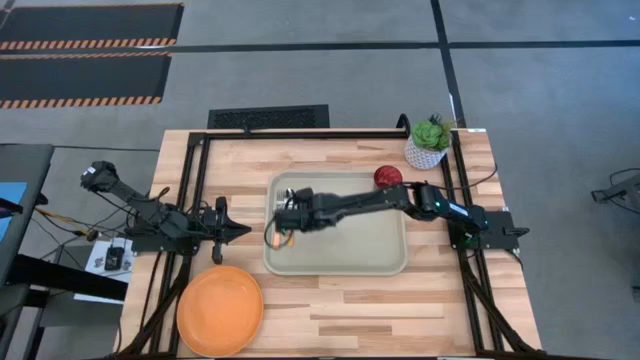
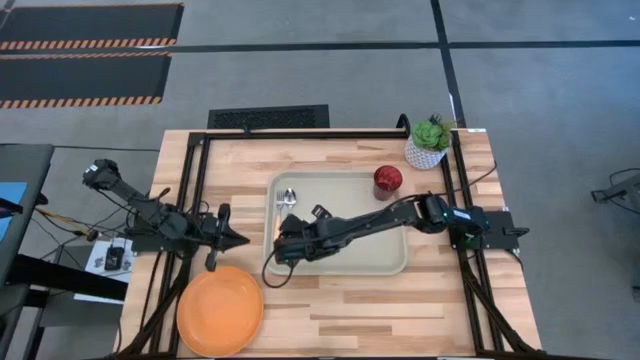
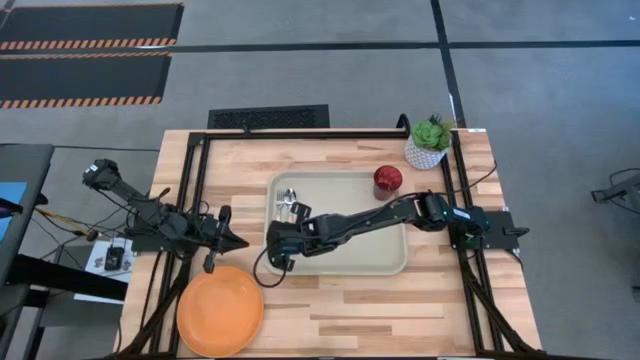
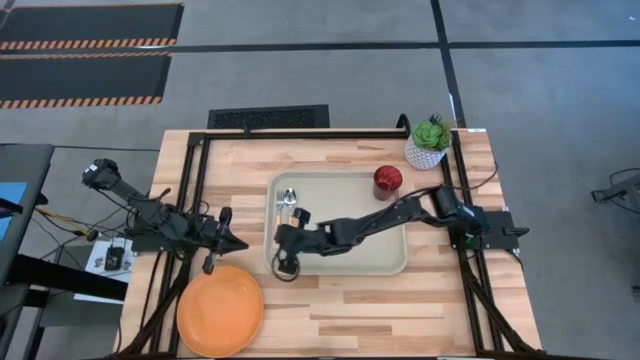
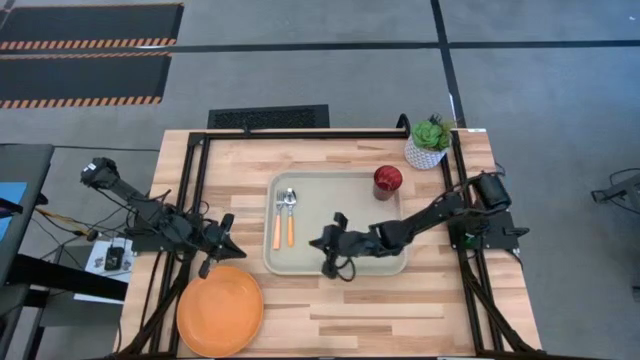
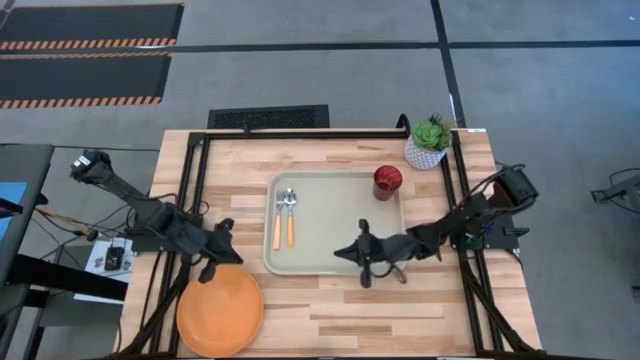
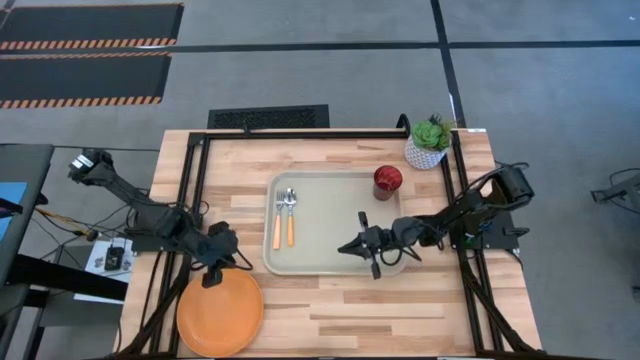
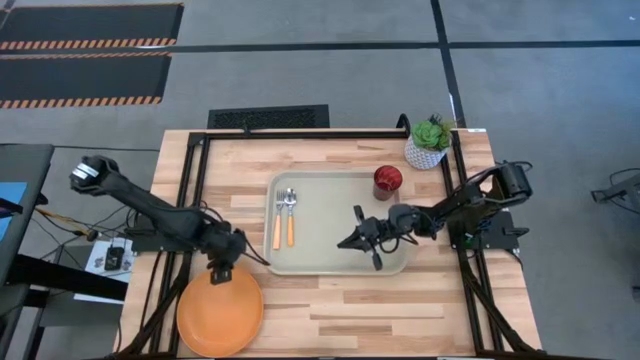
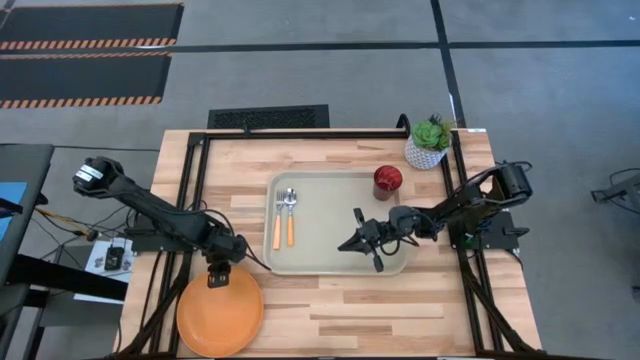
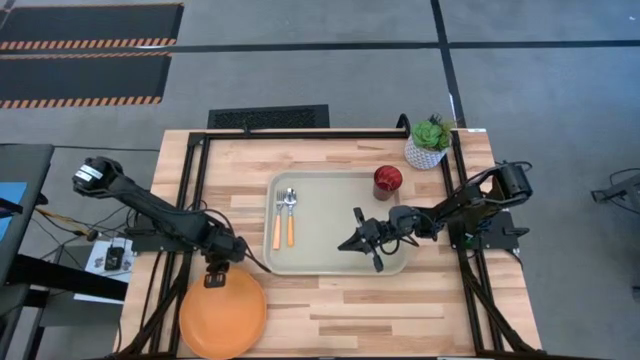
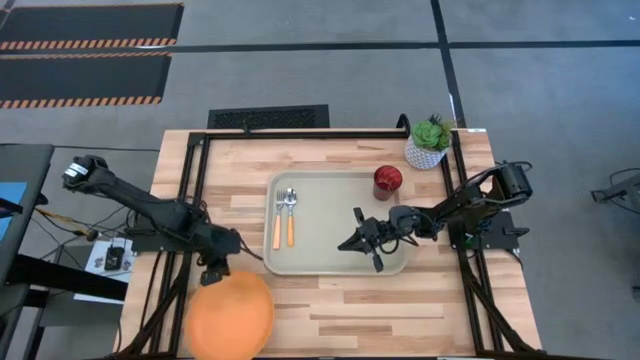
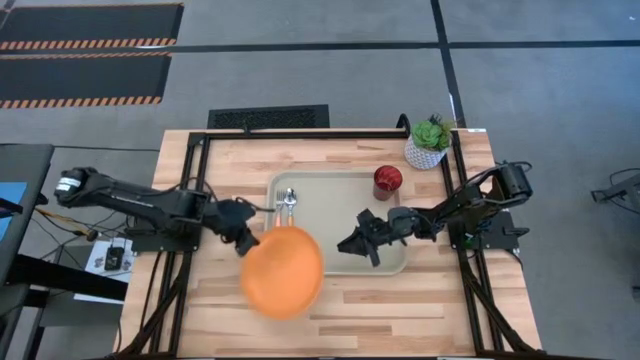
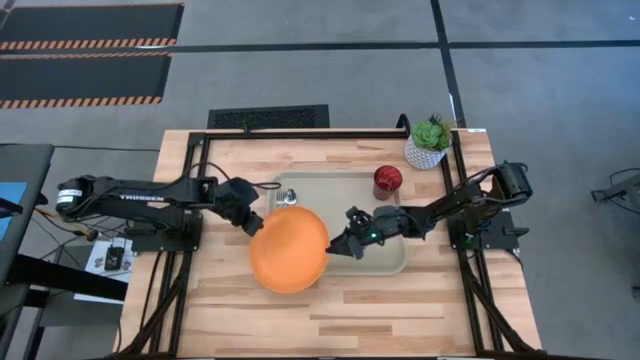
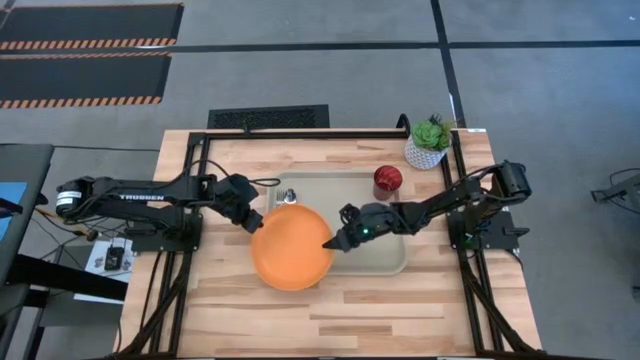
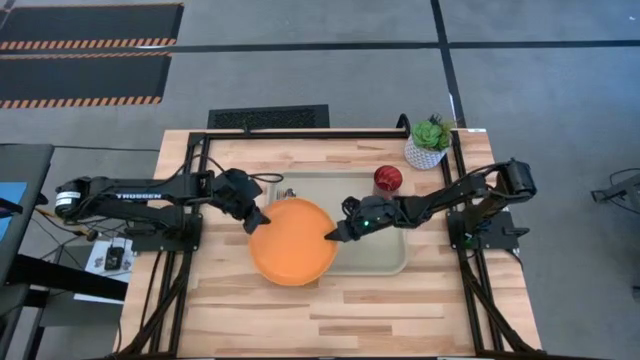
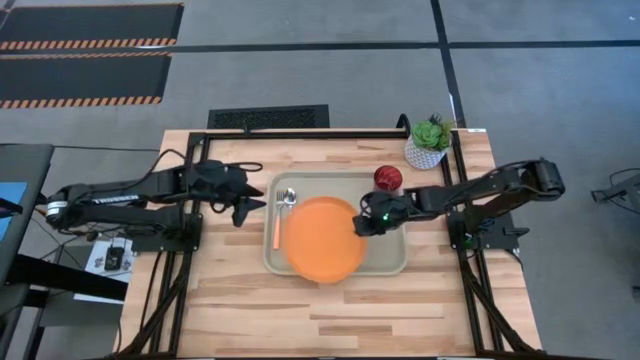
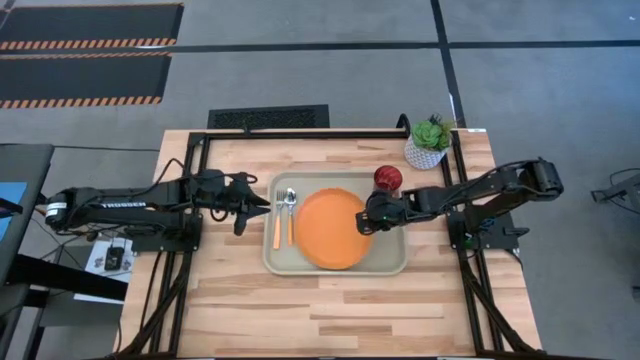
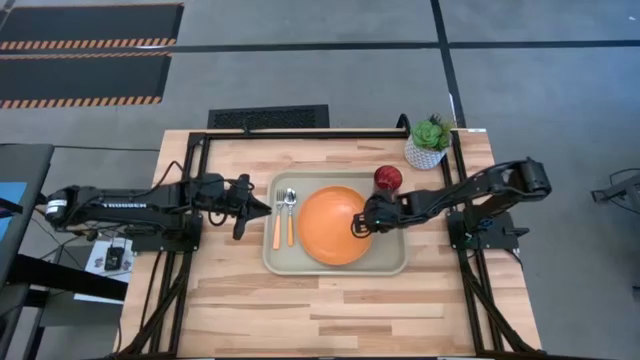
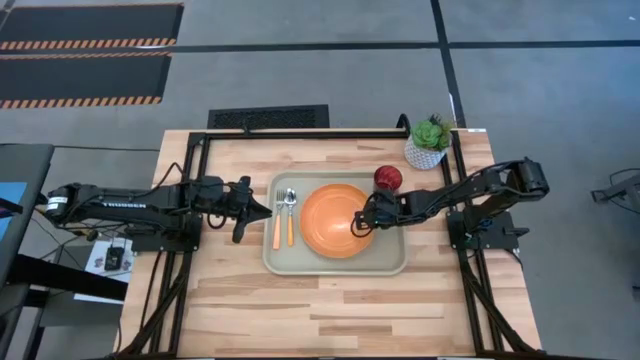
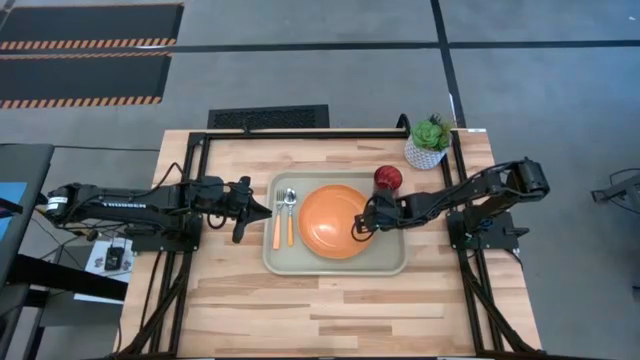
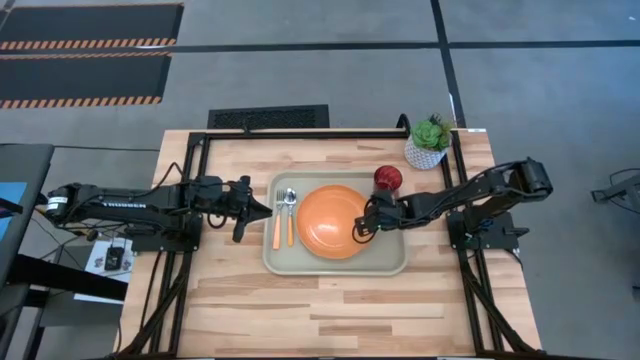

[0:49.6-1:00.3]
Task: Pick and place plate/cup/fork/spoon on tray
Put the orange plate on the light brown serving tray to the bottom left of the red glass

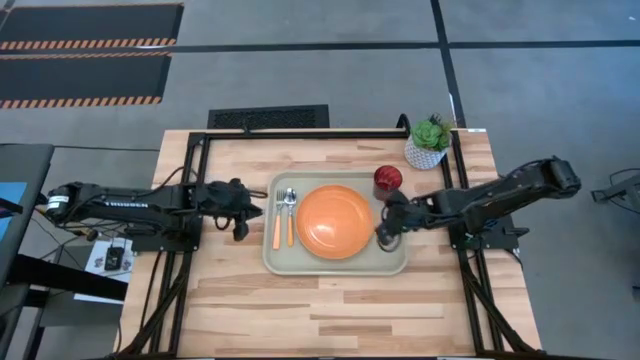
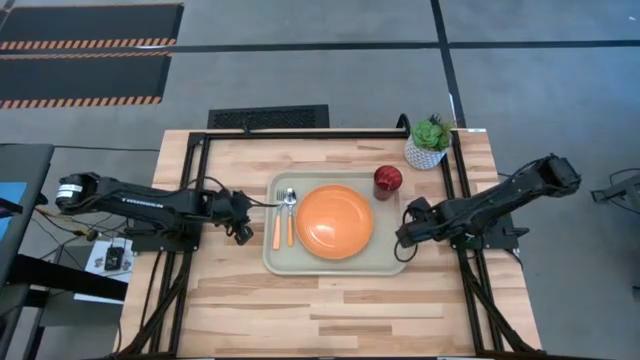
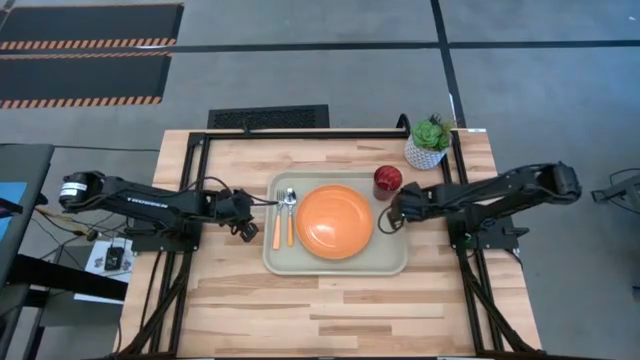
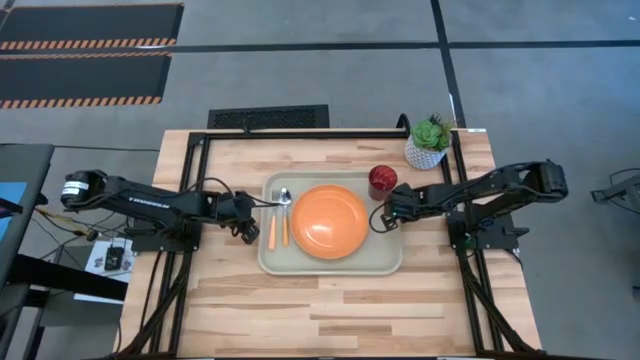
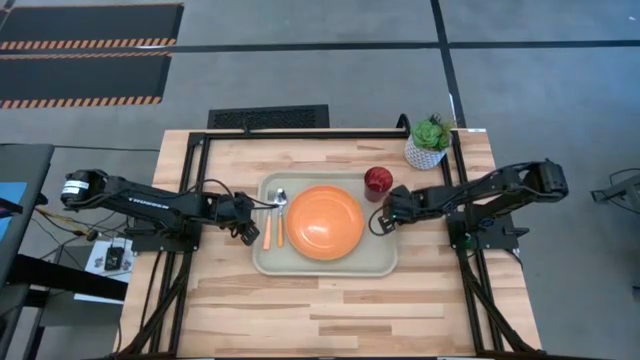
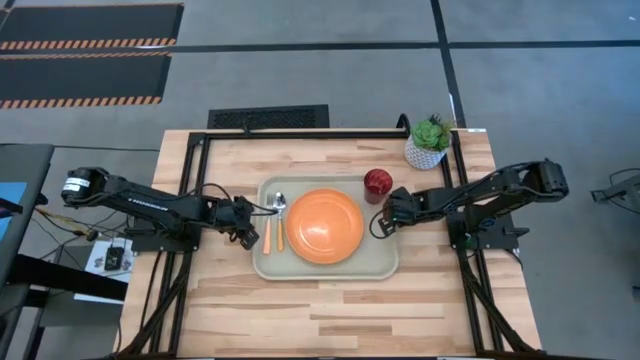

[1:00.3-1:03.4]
Adjust the light brown serving tray

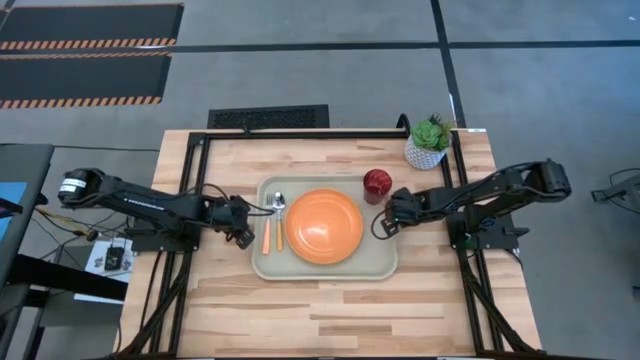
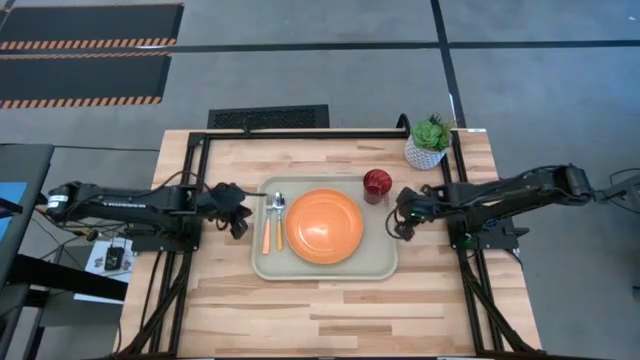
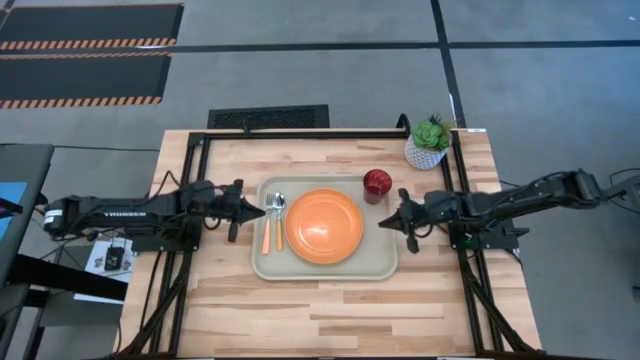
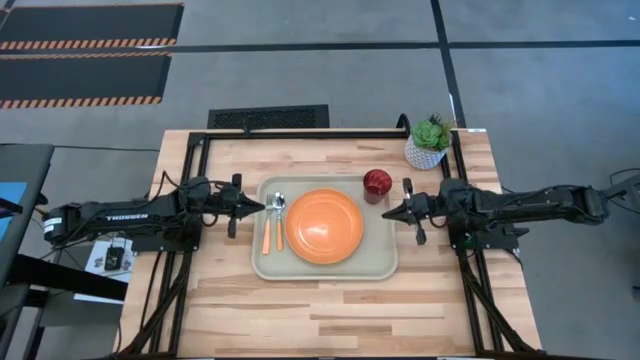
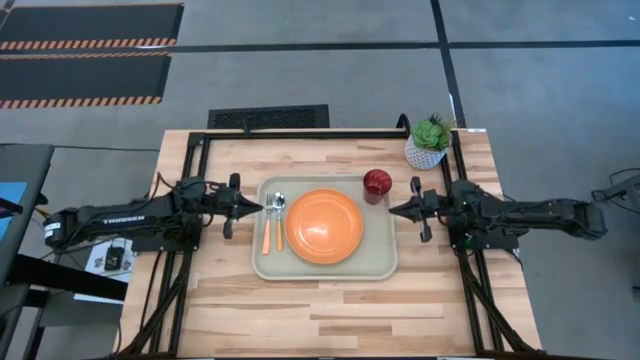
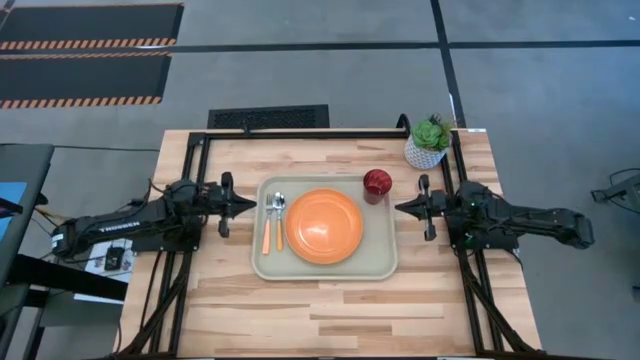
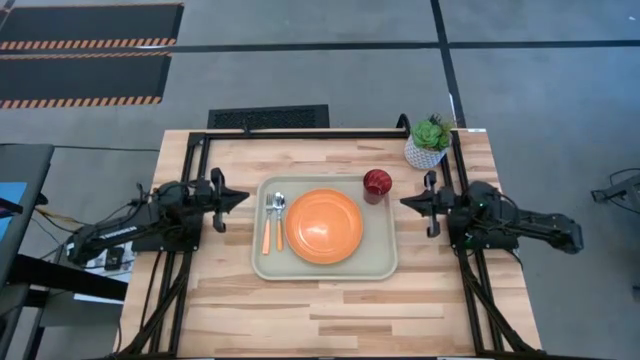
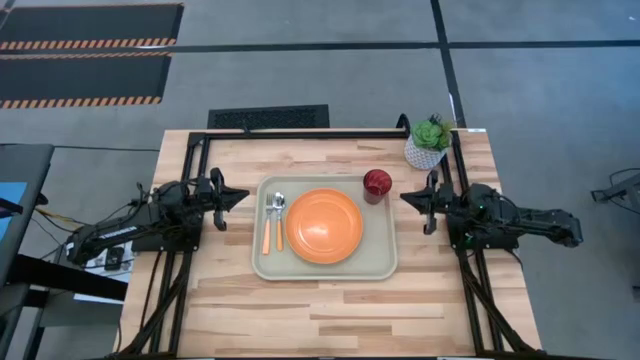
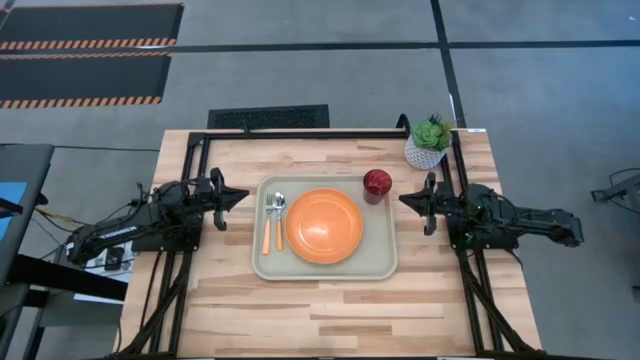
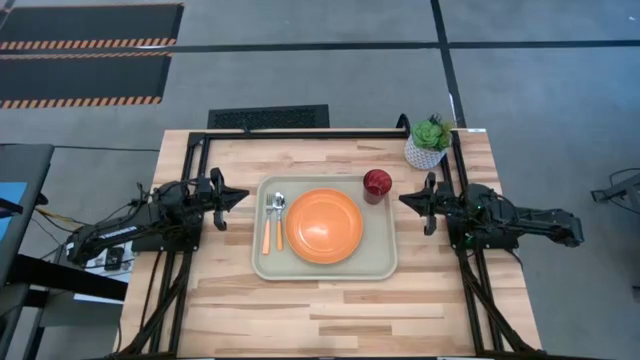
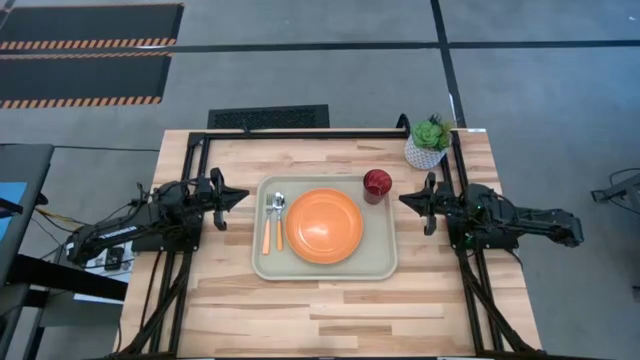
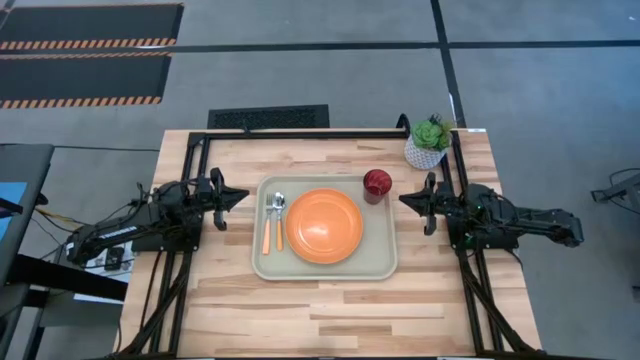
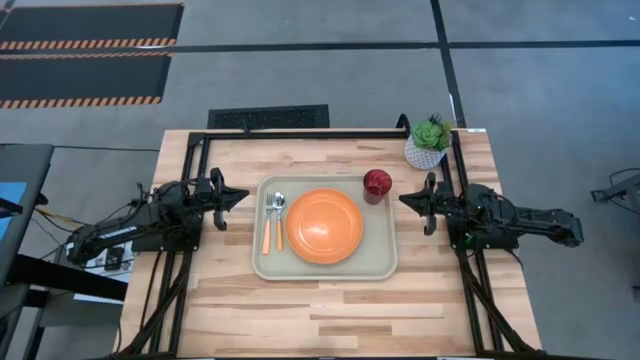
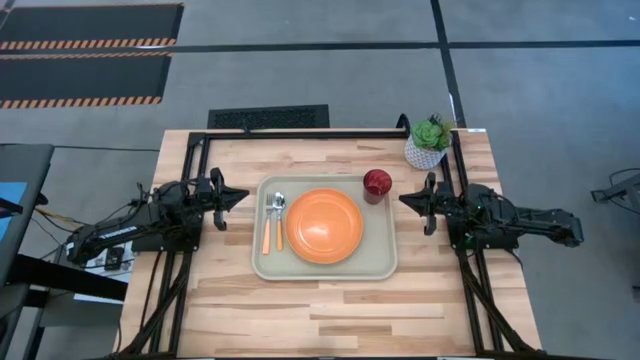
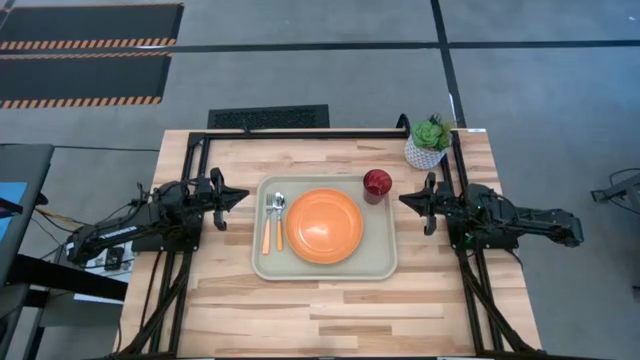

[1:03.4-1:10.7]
Return to Home Position
